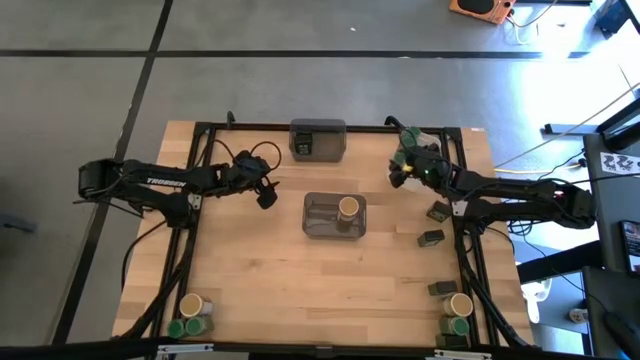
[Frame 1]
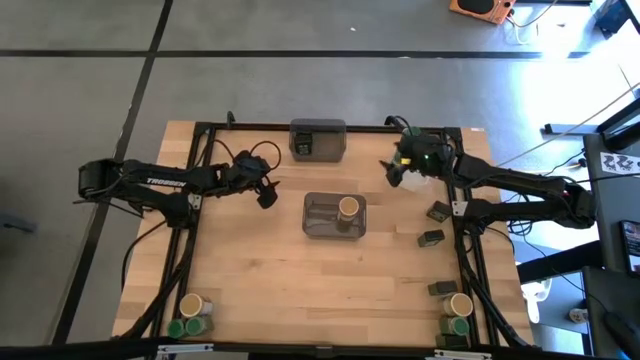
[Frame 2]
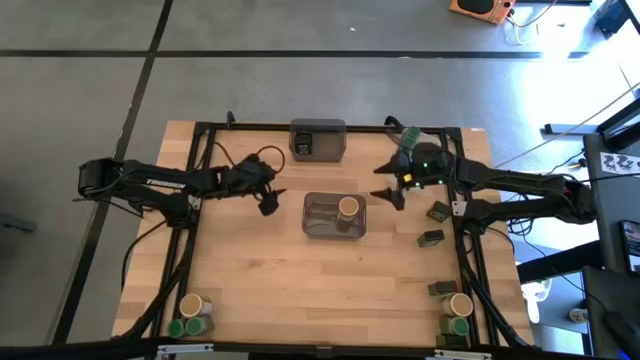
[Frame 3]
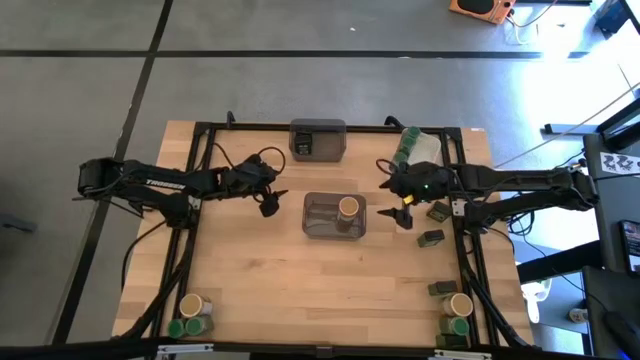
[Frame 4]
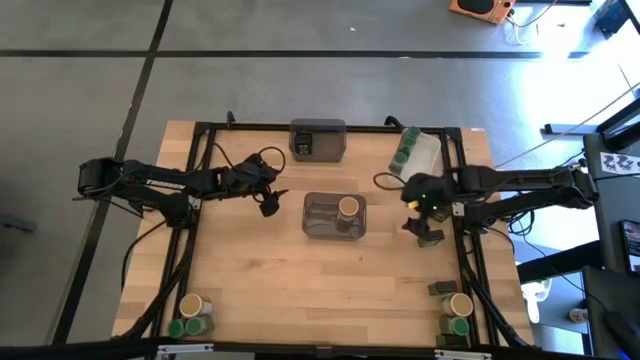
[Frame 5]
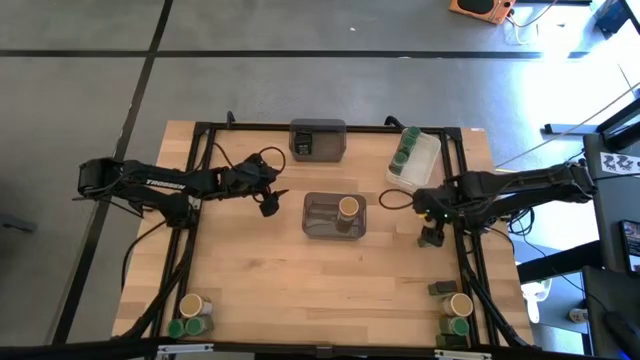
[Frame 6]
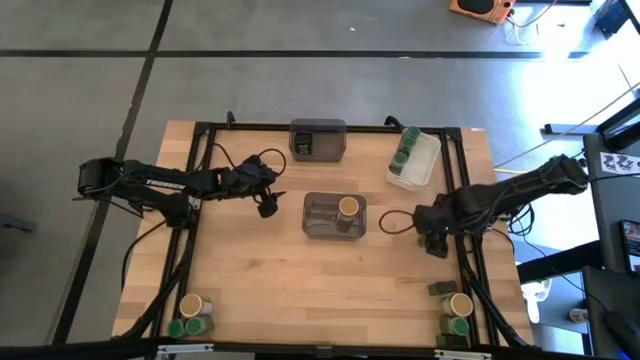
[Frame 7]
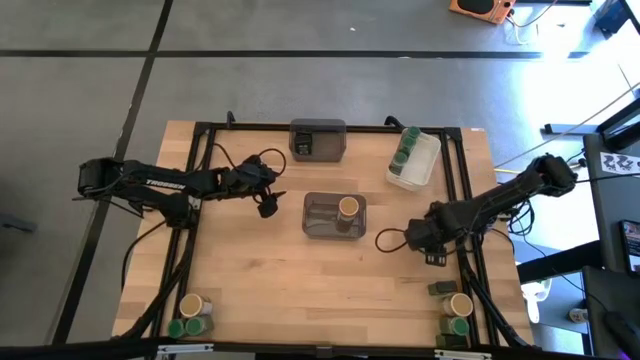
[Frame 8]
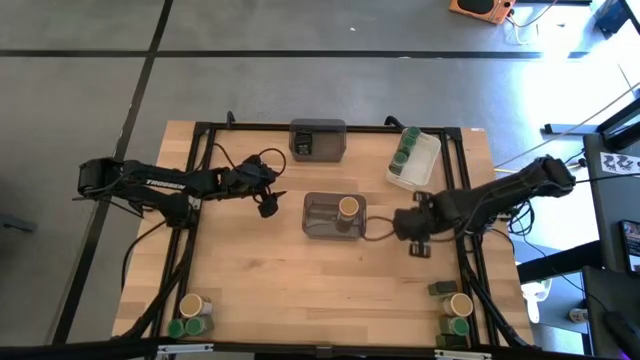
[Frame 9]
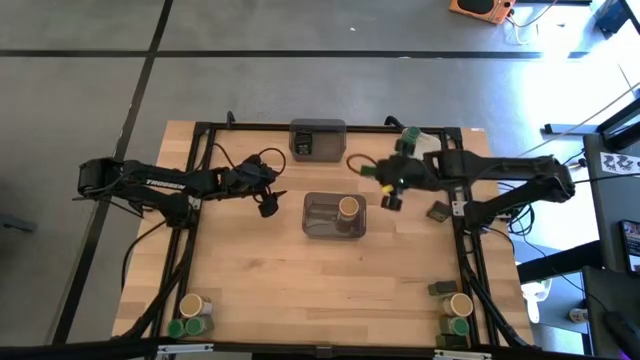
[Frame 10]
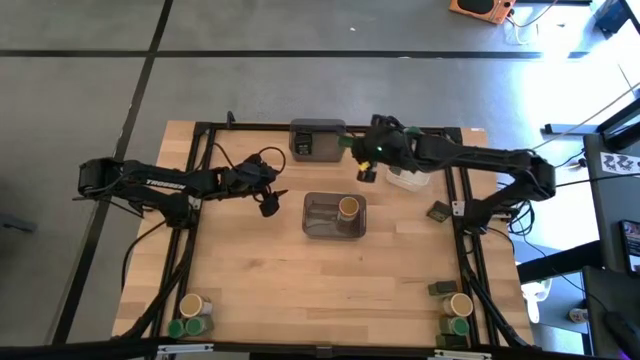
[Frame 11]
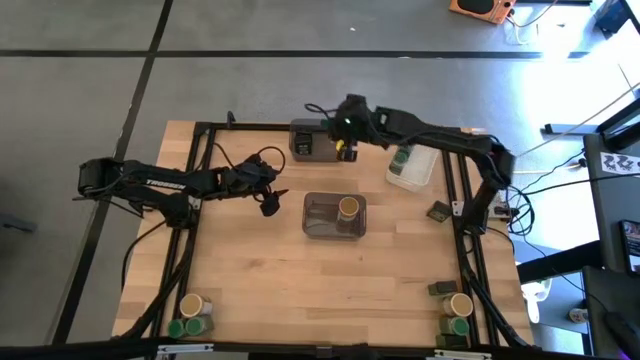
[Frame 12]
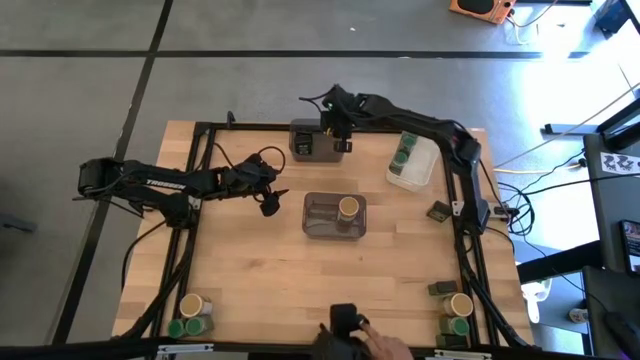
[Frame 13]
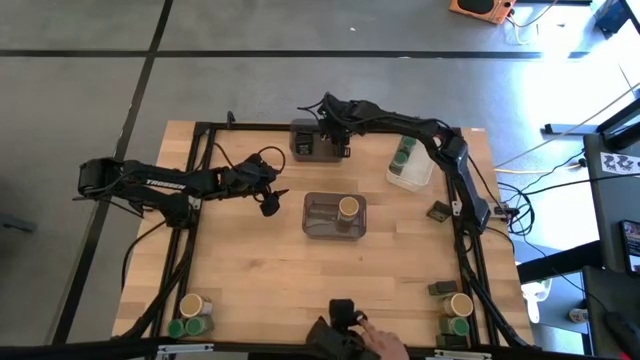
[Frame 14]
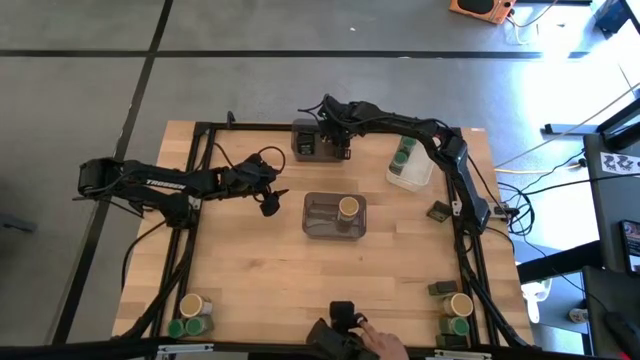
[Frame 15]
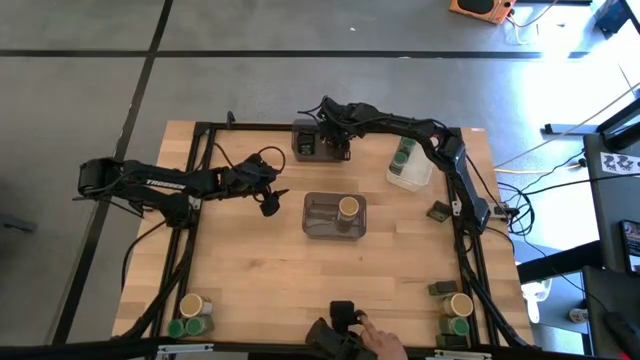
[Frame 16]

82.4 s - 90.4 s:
Task: Sort spices by type
Put the black seasoning can into the top black bin

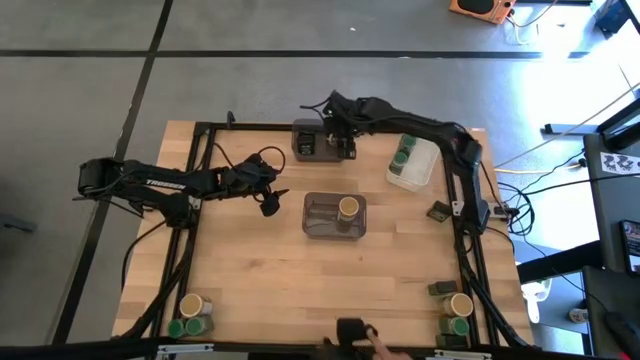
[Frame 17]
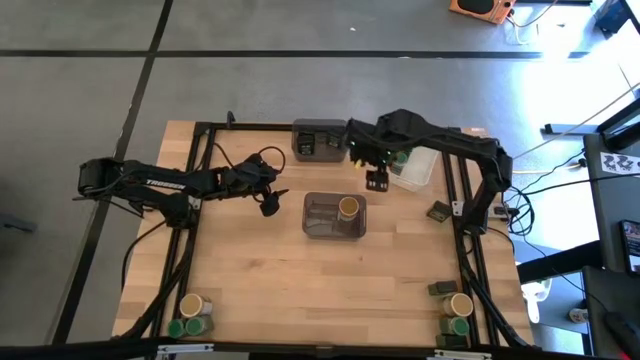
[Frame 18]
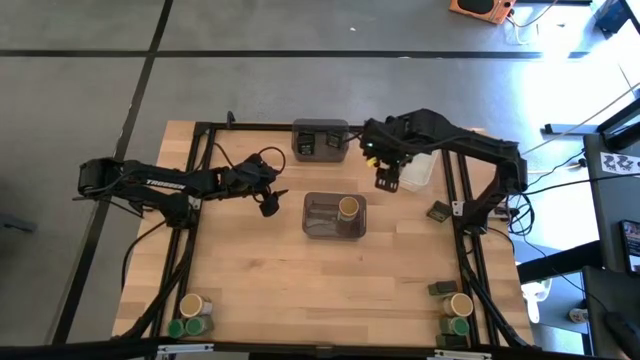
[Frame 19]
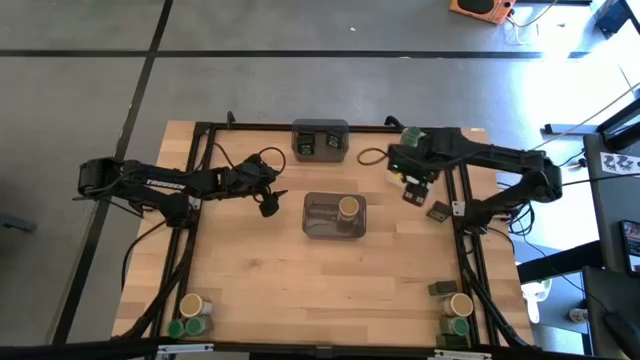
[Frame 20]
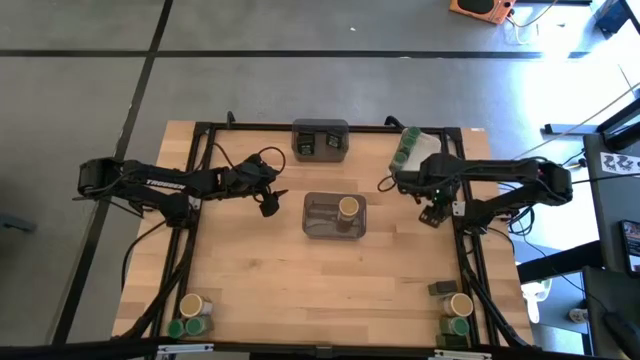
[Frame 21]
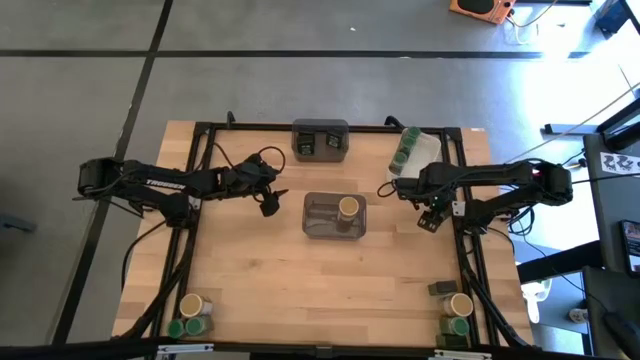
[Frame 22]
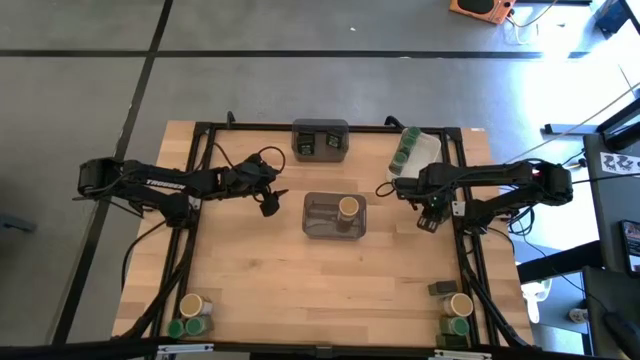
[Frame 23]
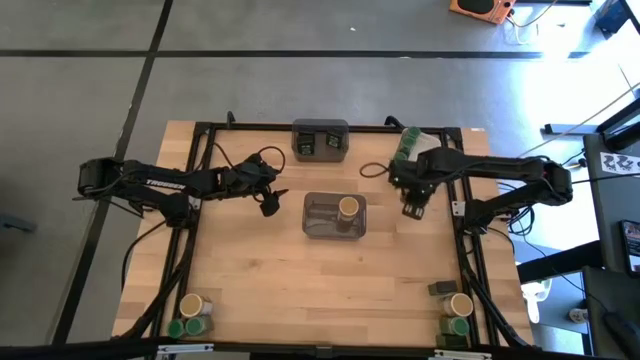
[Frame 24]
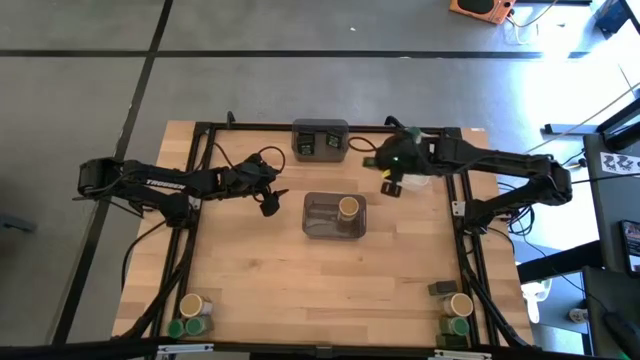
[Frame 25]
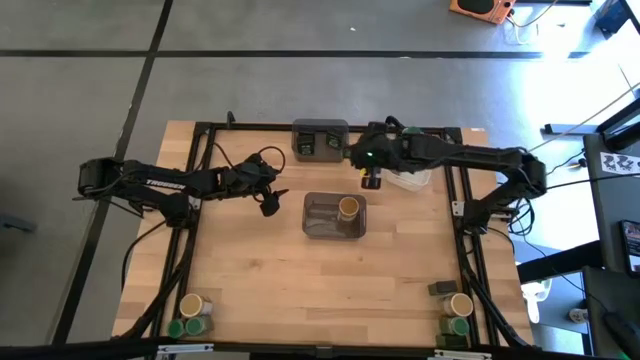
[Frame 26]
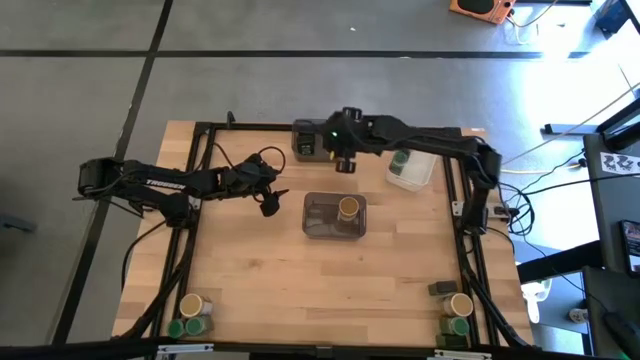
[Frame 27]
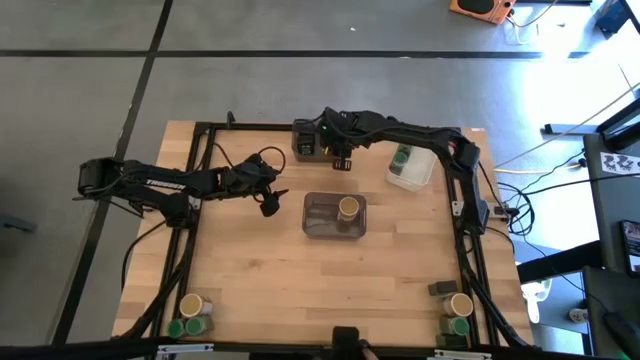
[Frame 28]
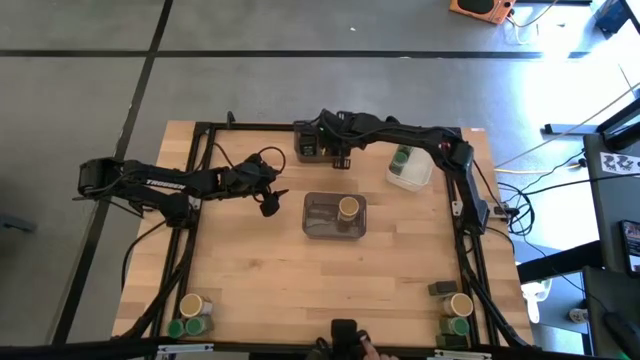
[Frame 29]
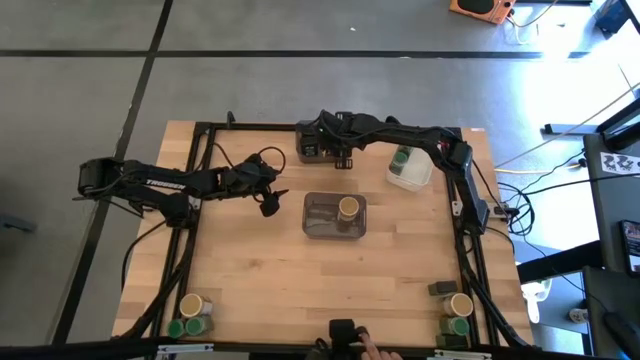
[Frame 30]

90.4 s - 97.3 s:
Put the black seasoning can into the top black bin

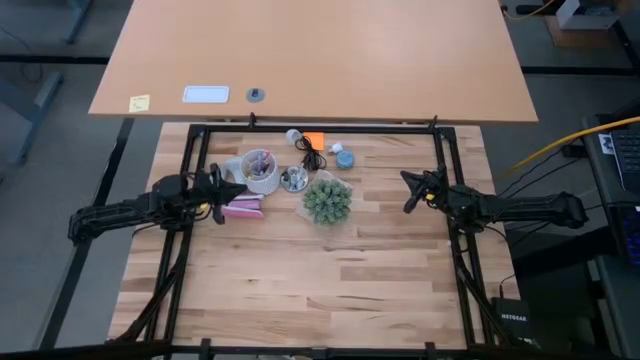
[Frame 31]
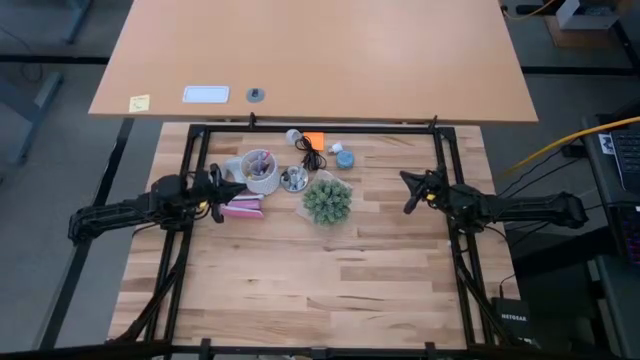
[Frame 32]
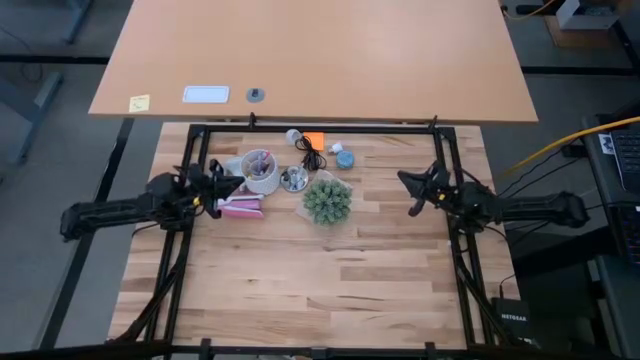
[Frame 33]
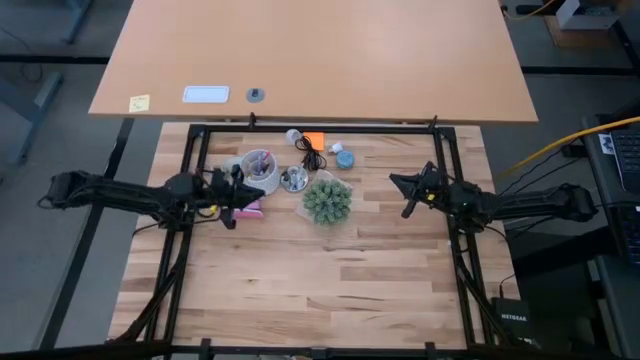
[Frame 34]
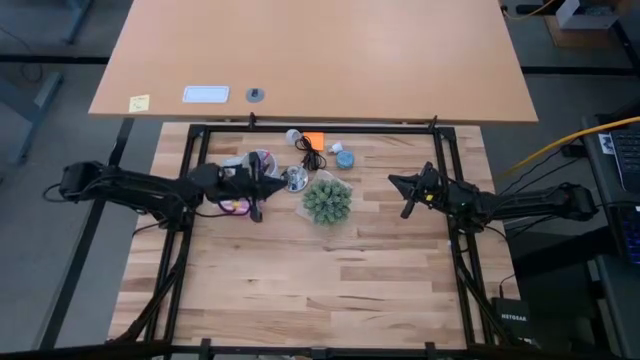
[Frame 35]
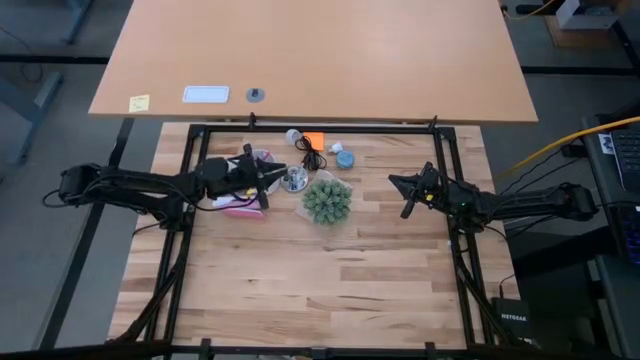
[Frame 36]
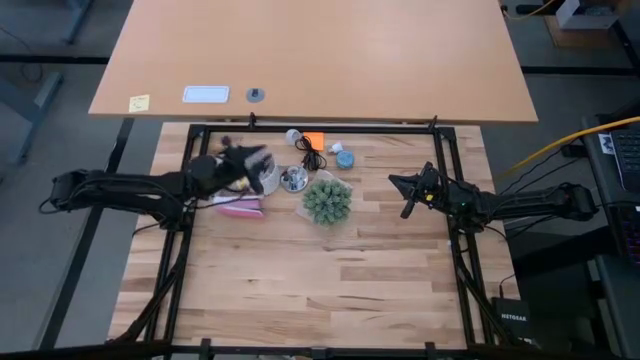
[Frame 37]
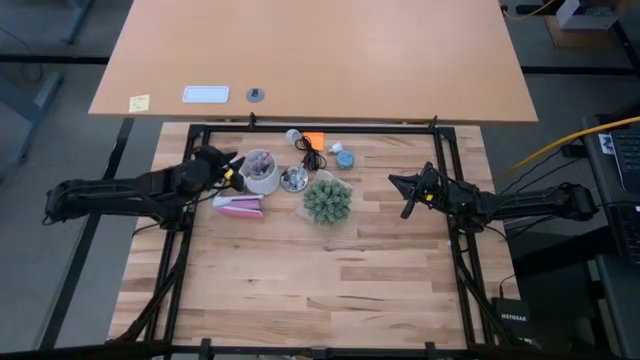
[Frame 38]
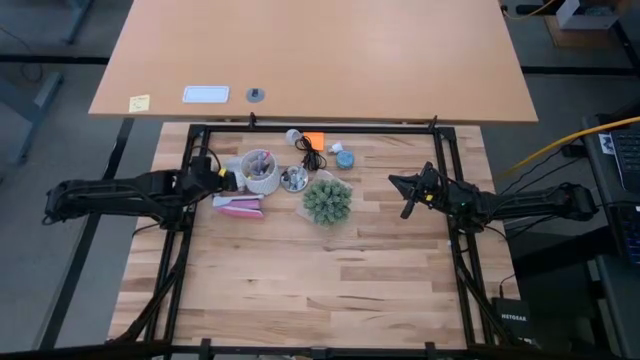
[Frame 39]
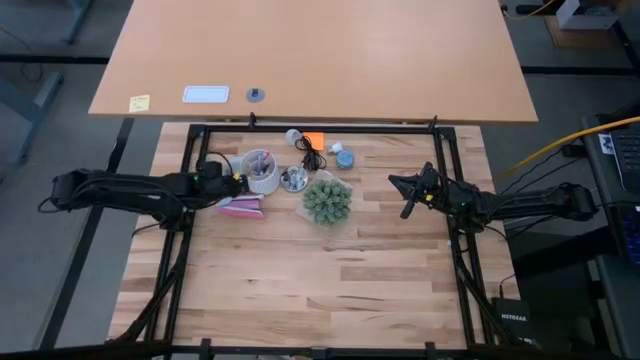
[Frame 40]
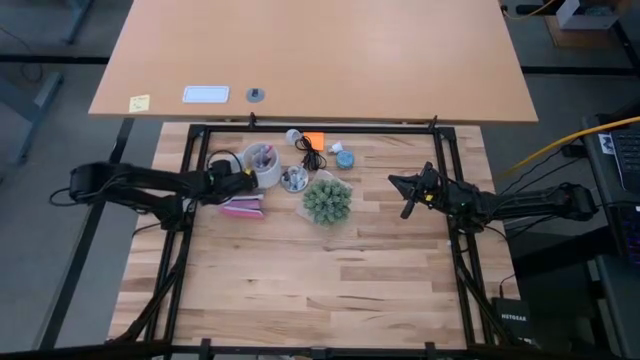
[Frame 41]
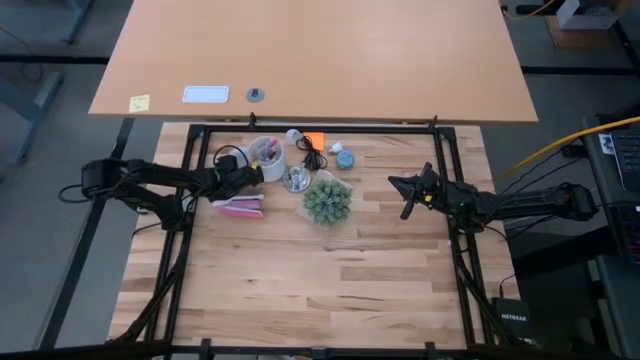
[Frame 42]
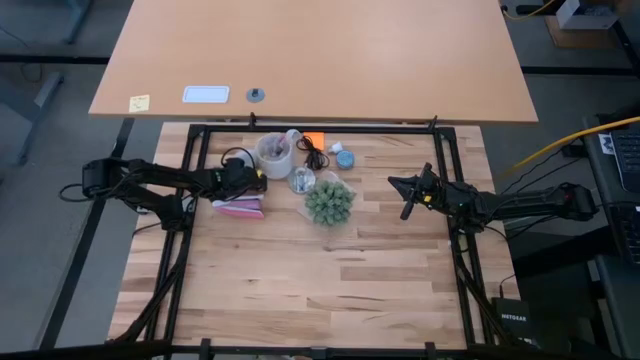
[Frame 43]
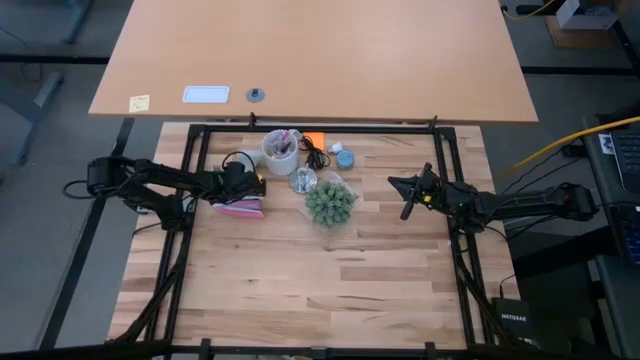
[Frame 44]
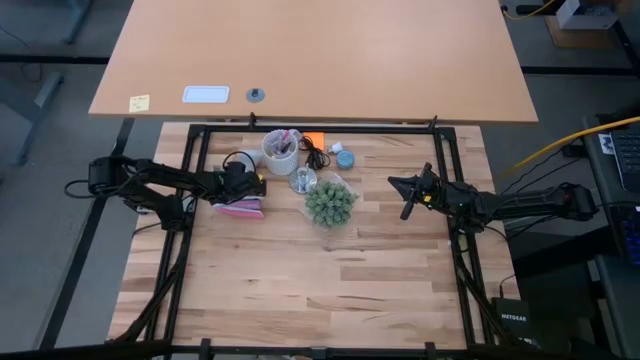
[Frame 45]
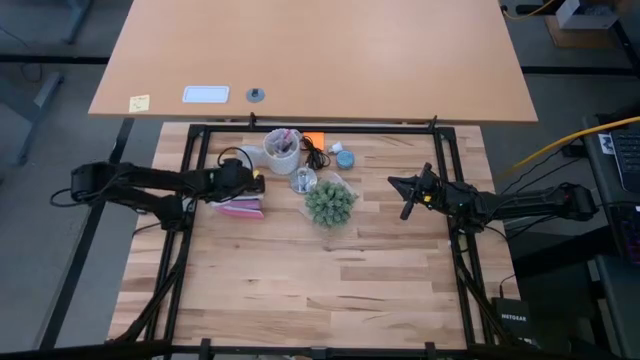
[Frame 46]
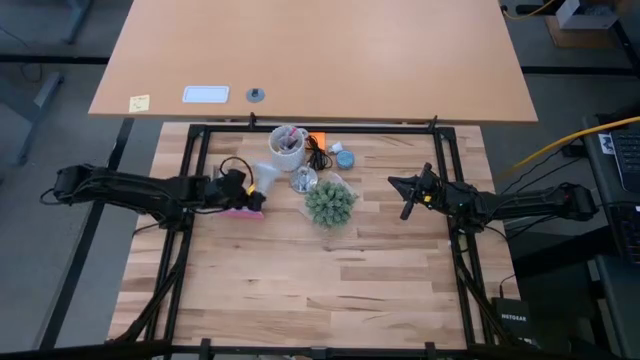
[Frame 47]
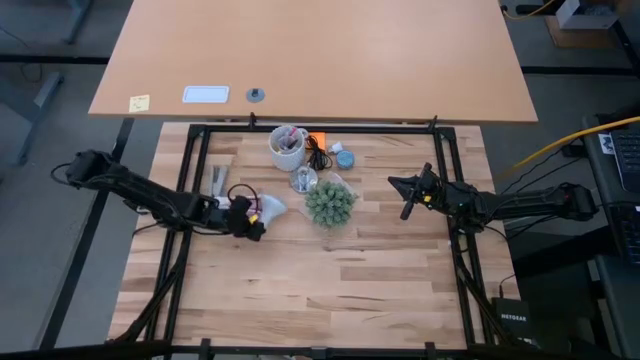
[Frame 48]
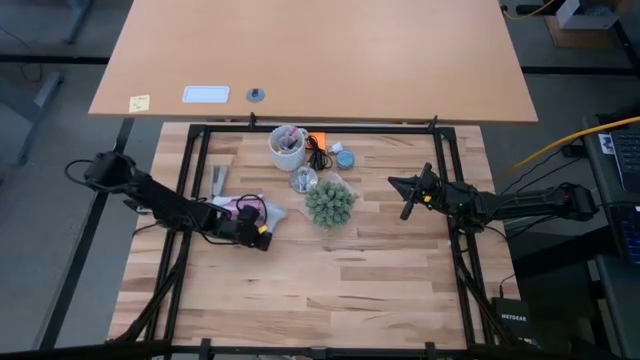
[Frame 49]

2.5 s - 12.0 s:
Task: Screw lightbulb
Move the light bulb to the middle left of the table
